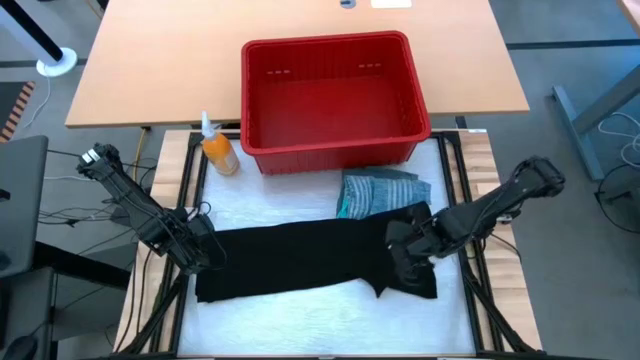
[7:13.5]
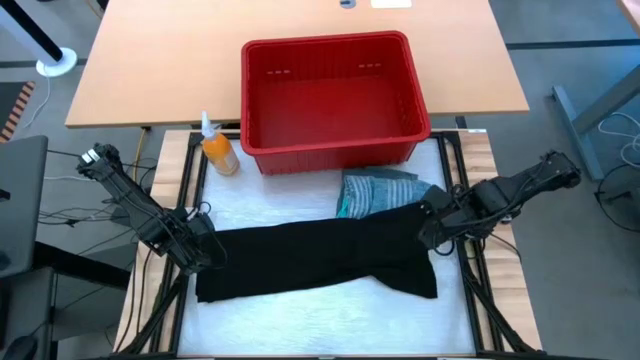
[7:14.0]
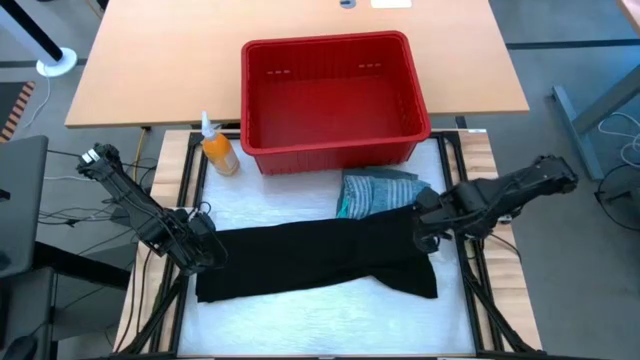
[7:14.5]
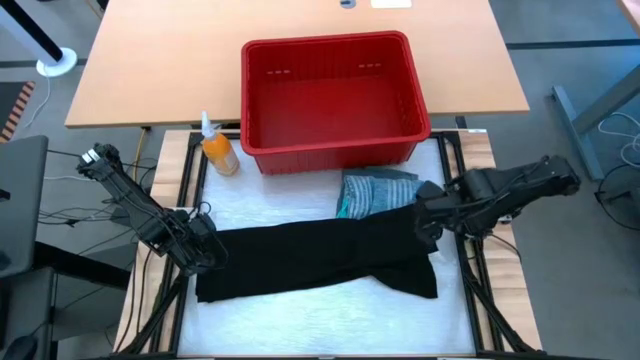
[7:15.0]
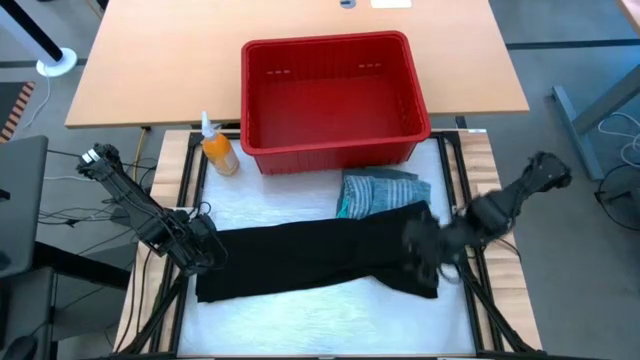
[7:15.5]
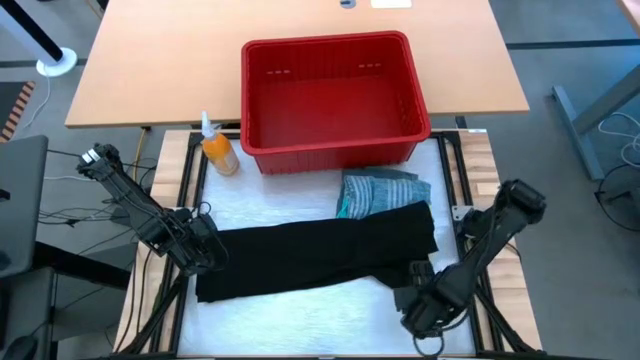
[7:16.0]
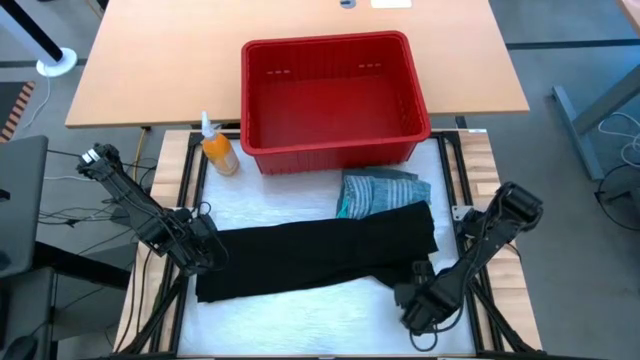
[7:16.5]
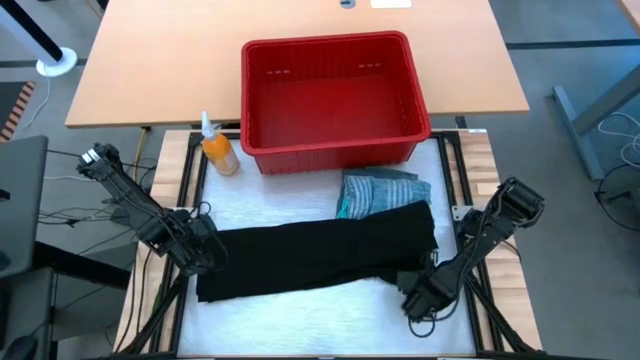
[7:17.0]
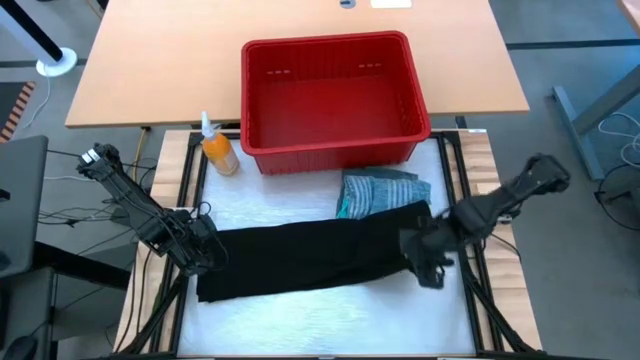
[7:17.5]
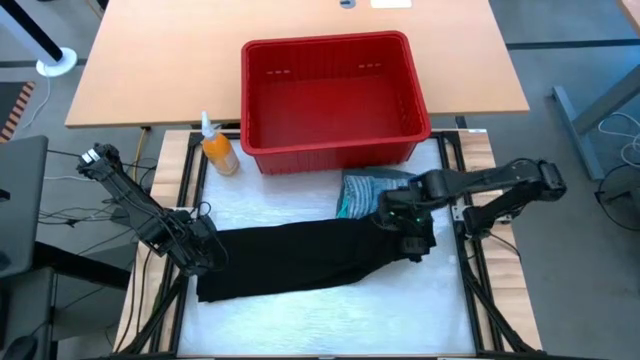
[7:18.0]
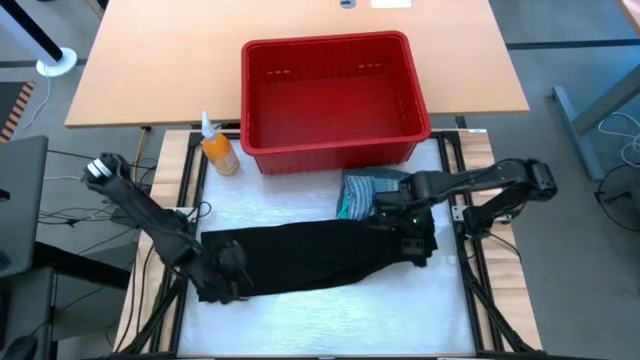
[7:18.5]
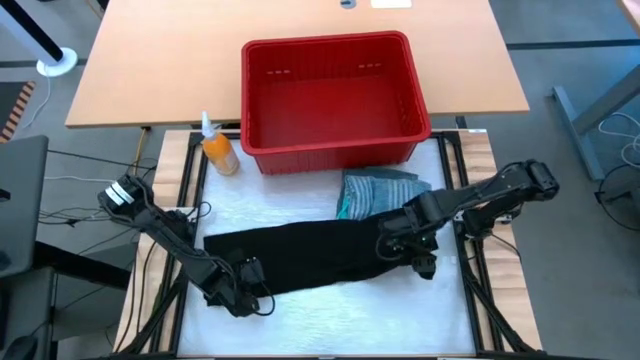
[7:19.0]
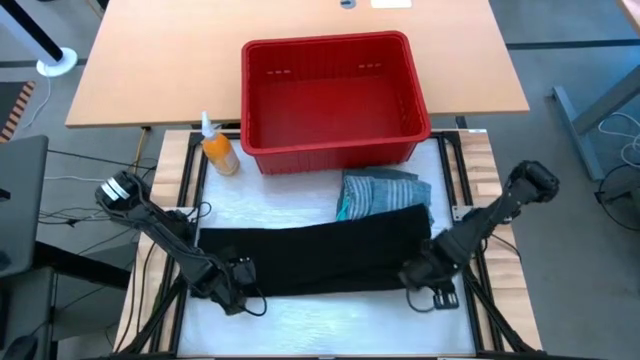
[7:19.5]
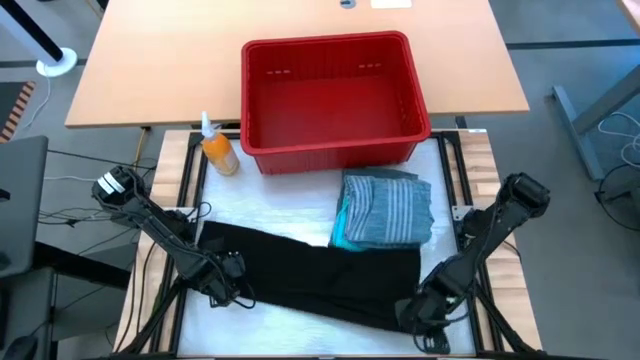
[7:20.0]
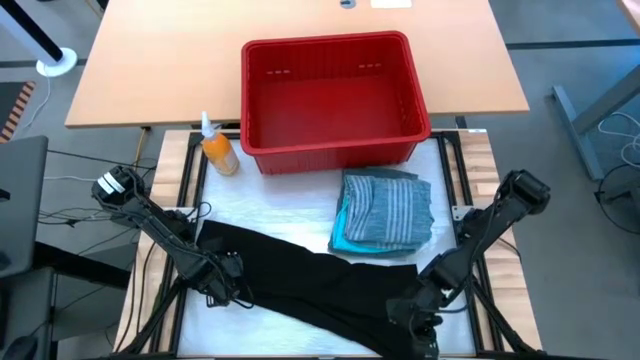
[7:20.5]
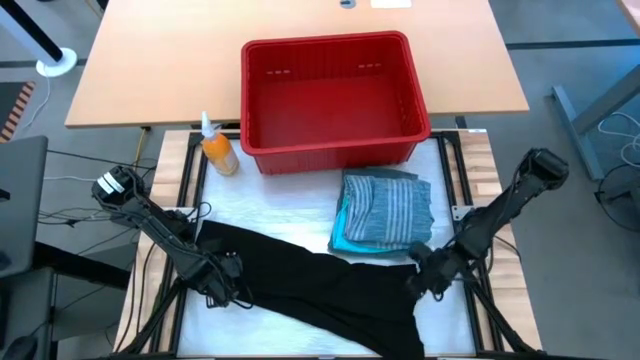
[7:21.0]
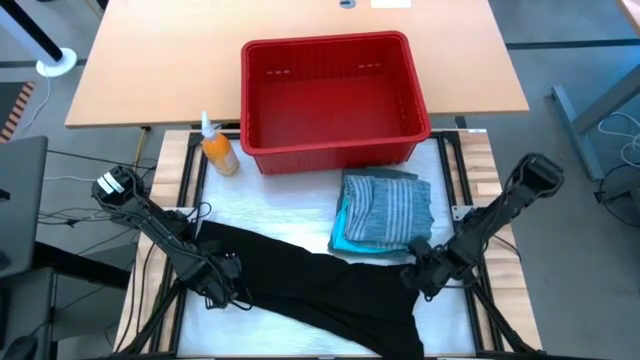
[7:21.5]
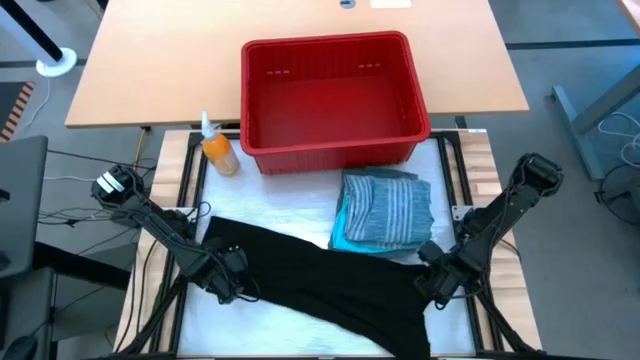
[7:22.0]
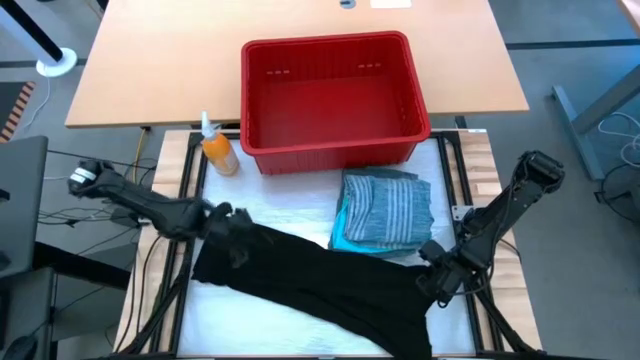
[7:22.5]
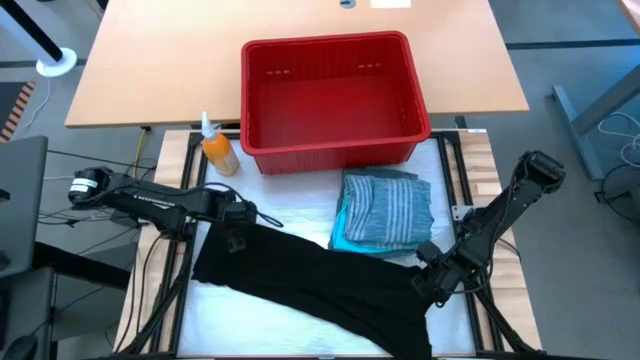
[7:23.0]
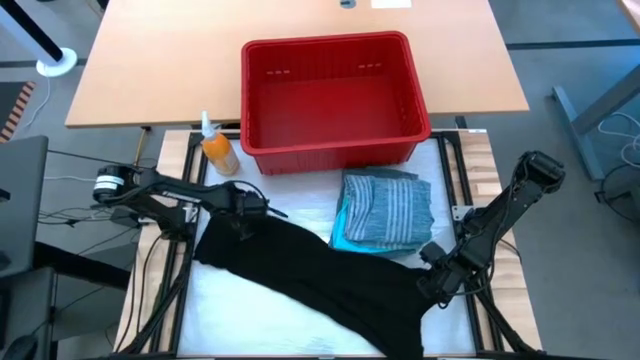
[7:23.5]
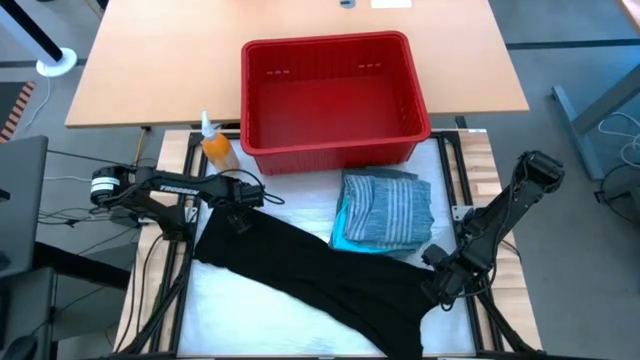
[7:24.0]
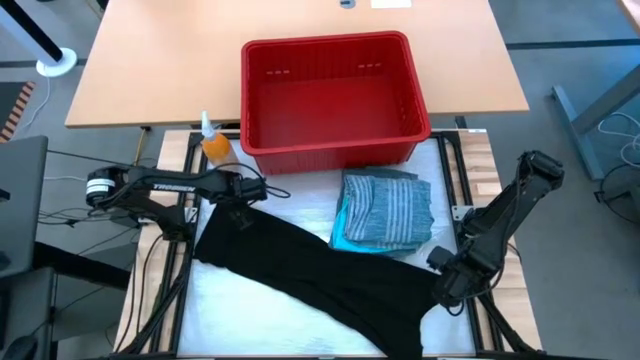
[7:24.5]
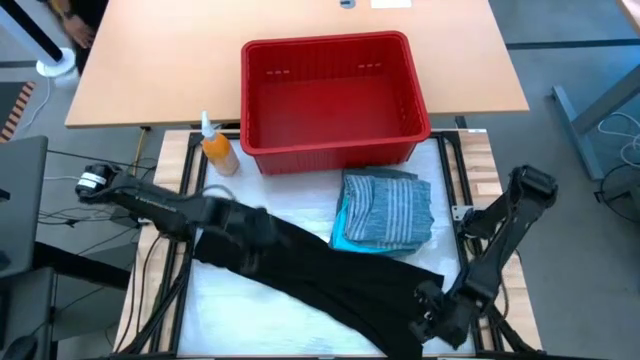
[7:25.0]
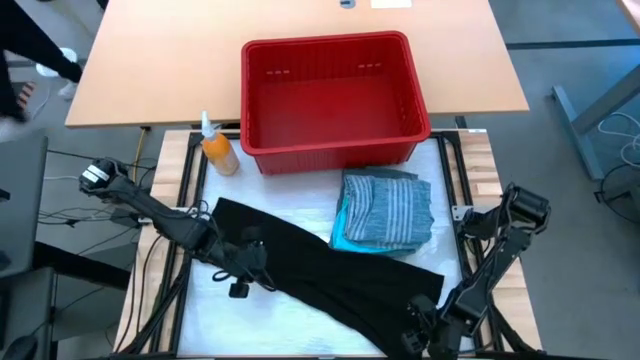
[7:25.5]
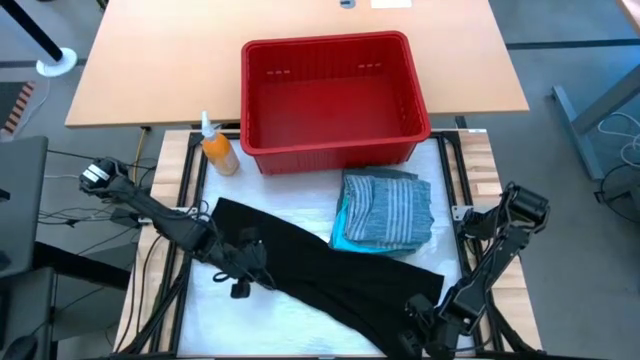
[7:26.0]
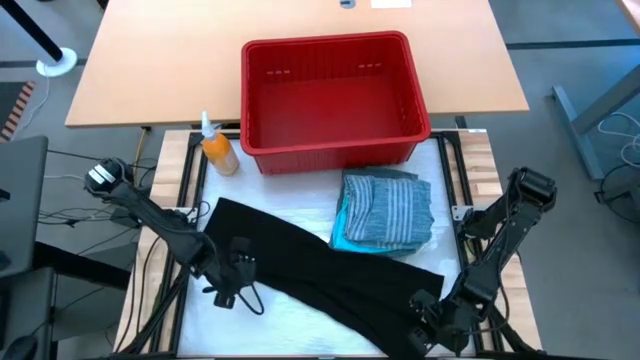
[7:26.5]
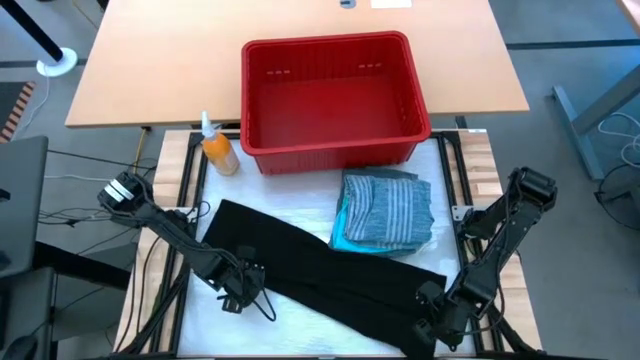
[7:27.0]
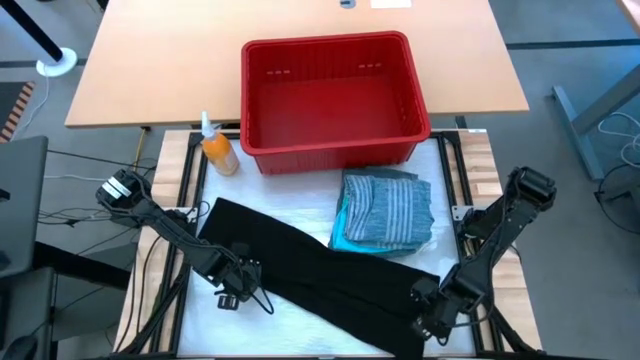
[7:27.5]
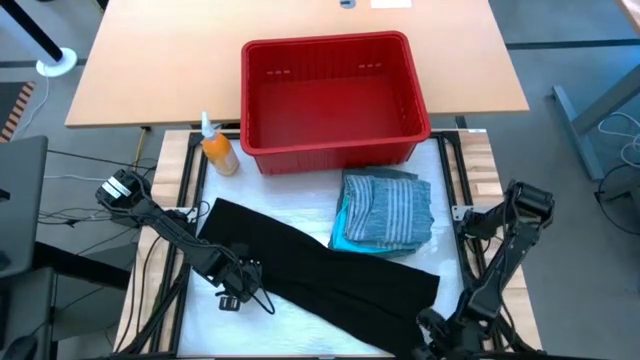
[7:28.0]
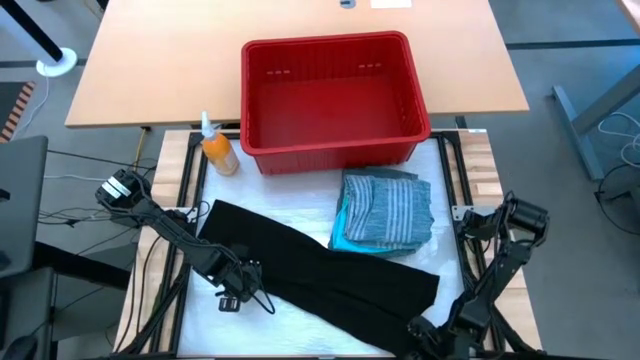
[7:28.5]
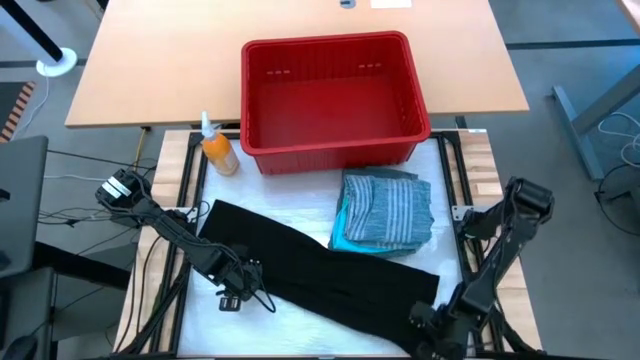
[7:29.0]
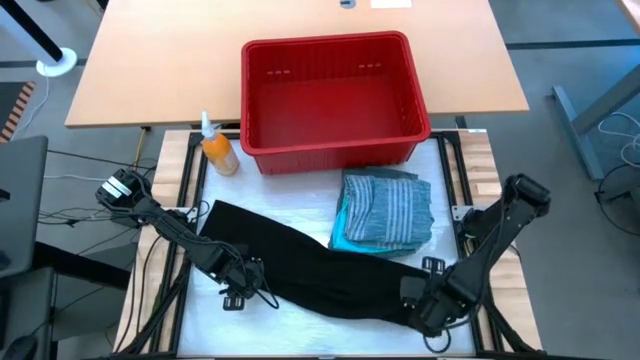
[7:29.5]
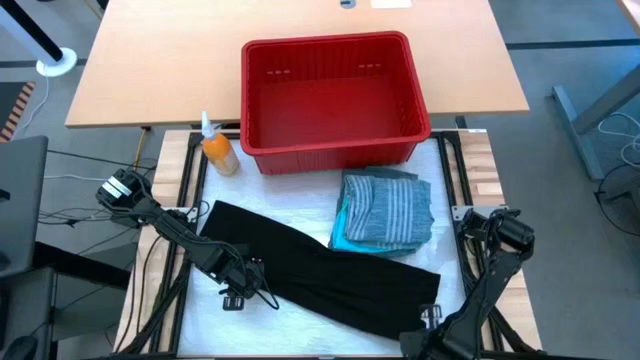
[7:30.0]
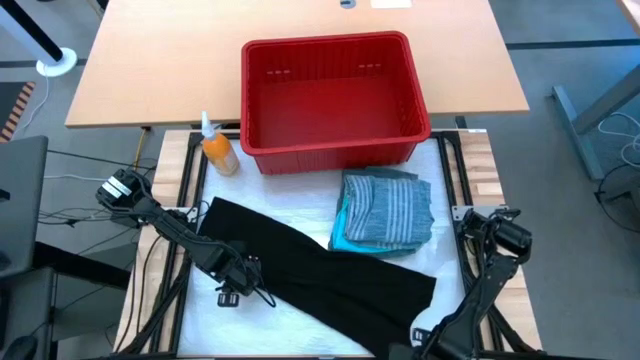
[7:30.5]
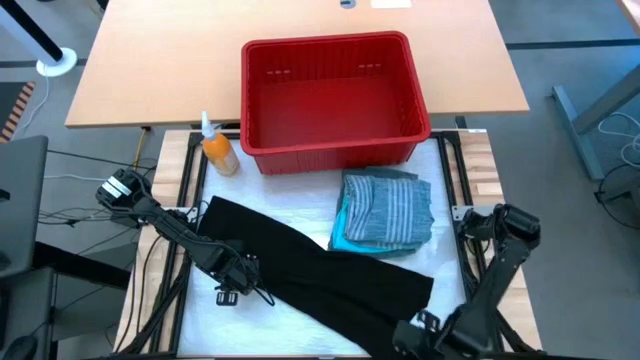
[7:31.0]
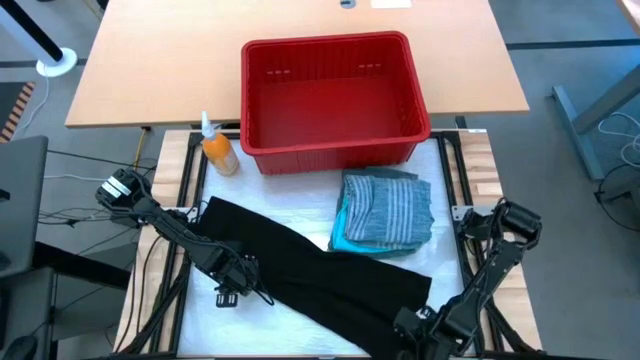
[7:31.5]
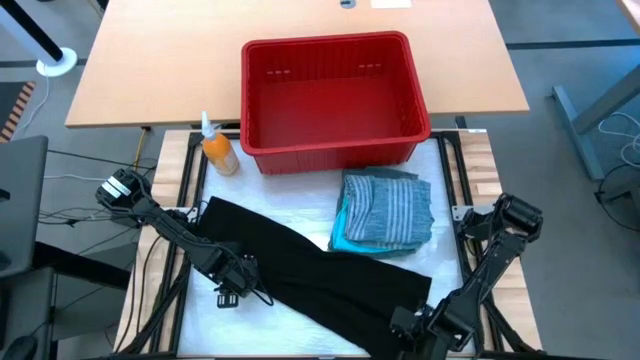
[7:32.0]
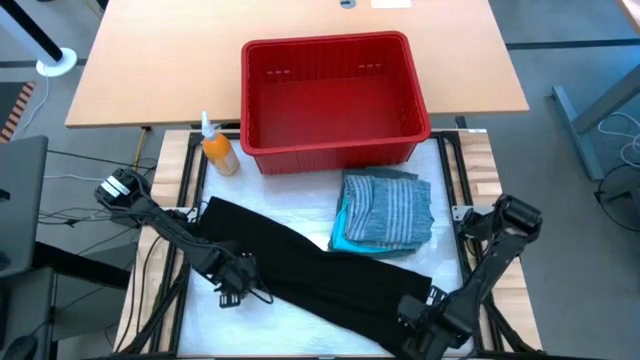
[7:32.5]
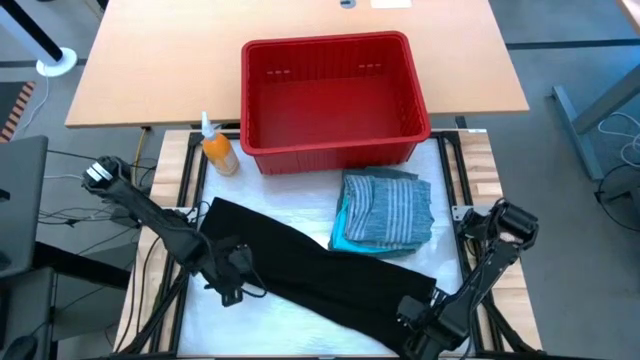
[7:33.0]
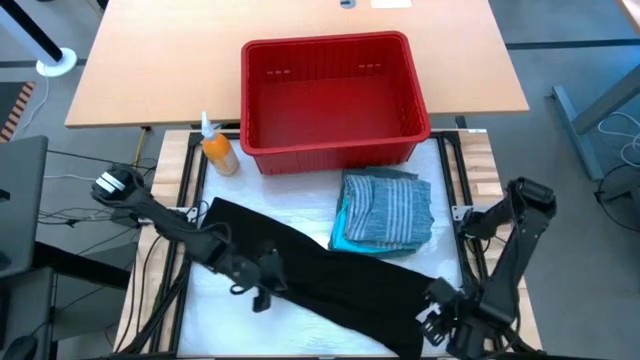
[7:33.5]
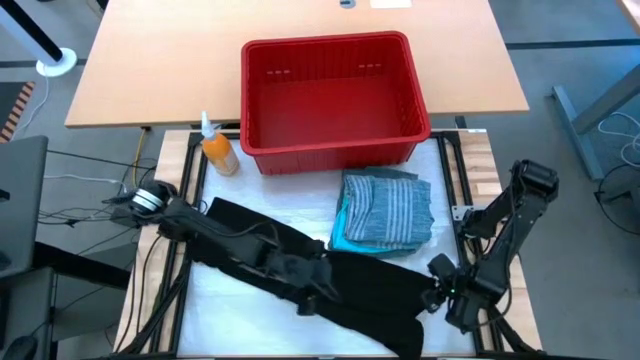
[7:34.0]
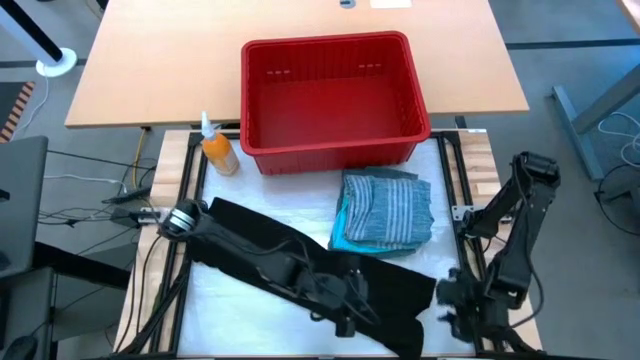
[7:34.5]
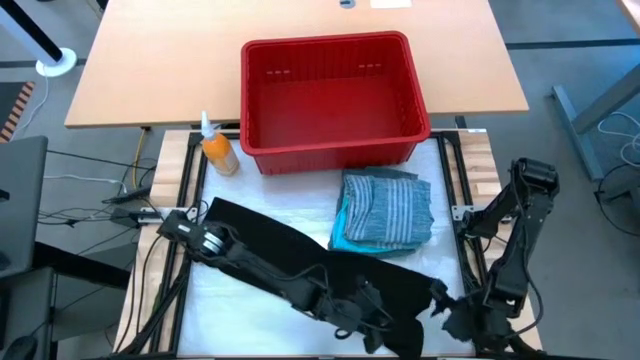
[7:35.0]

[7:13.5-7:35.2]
Task: Fold Laundry from Bin
Fold the black shirt
